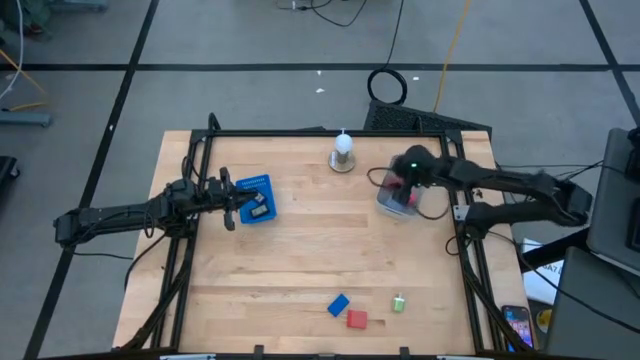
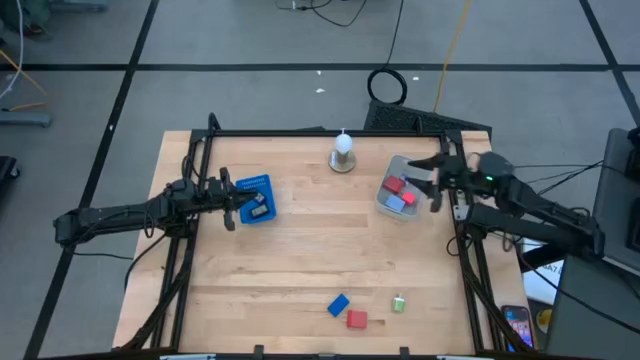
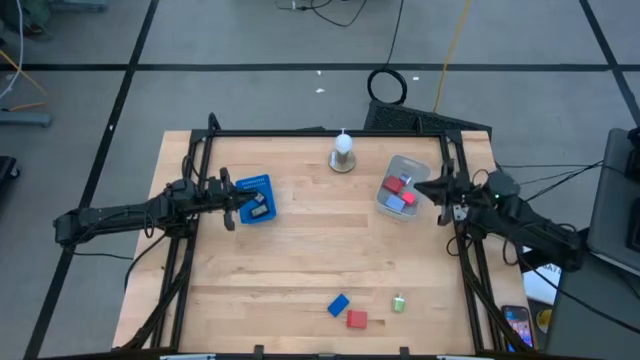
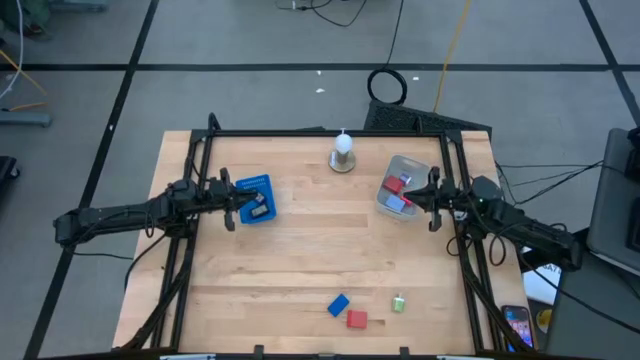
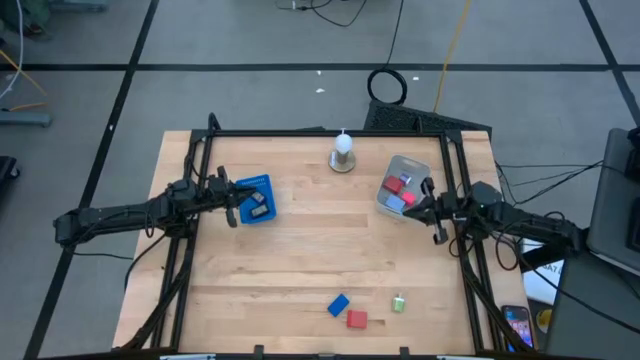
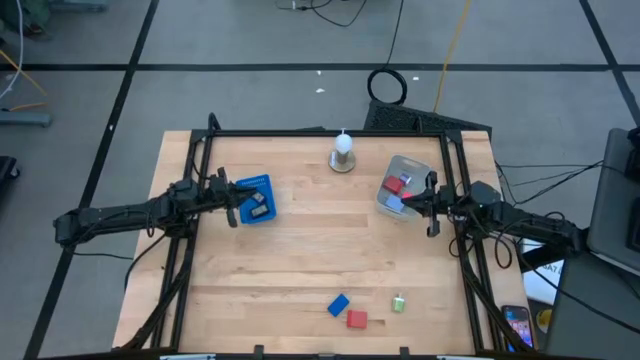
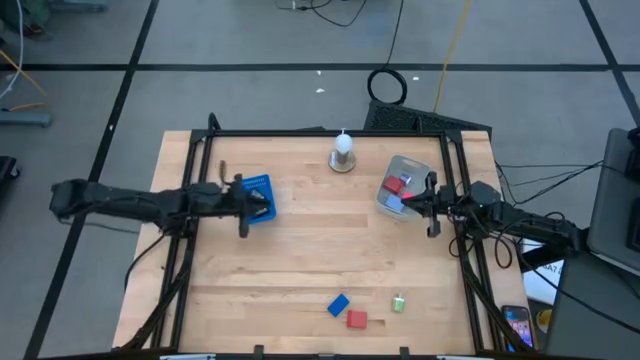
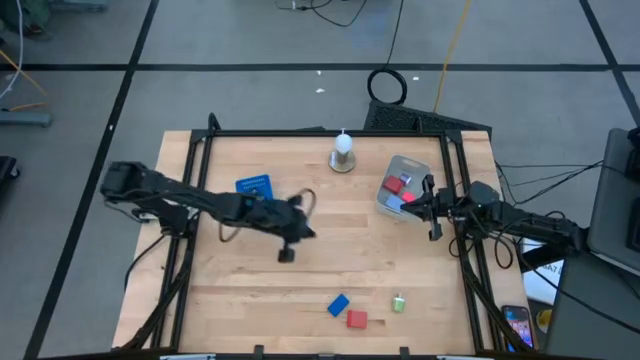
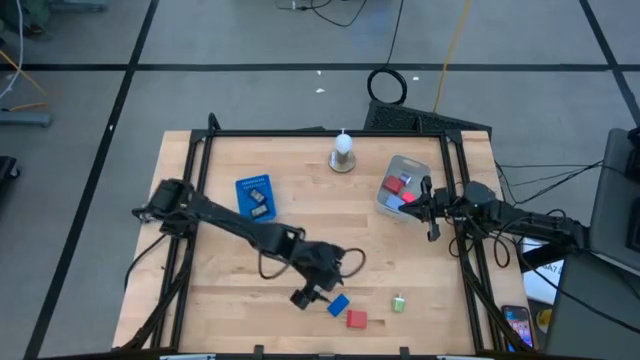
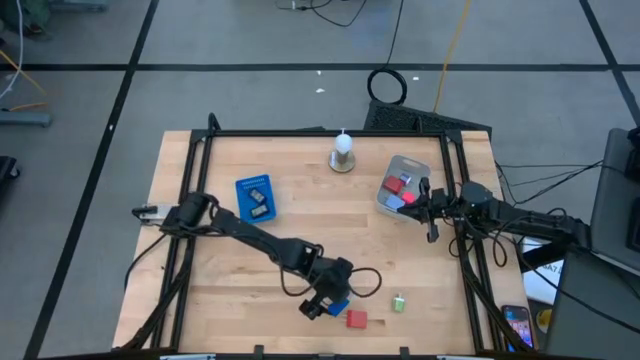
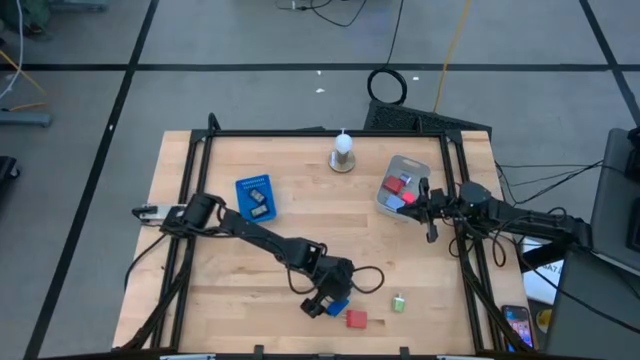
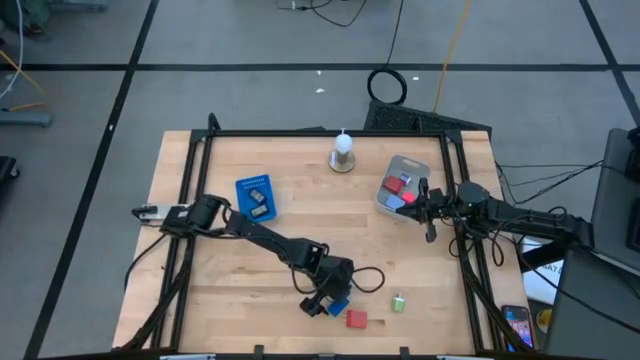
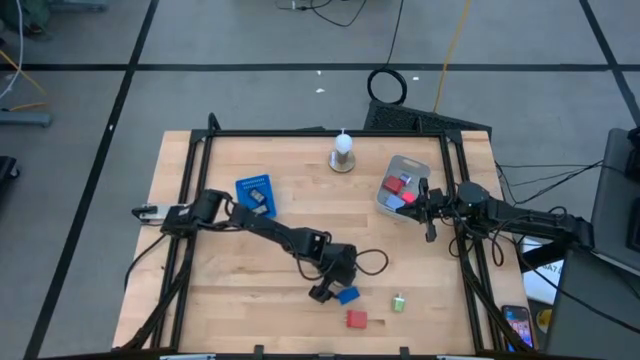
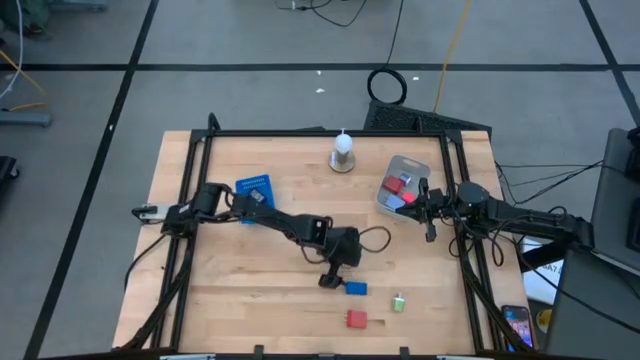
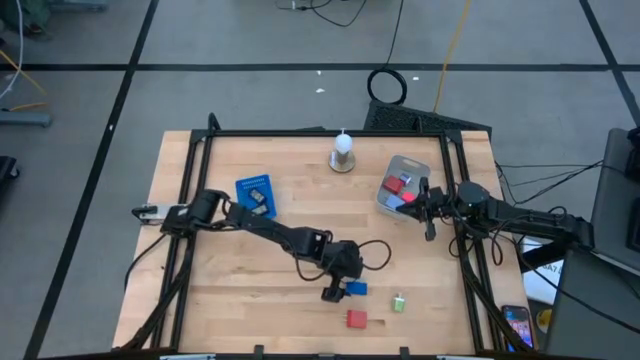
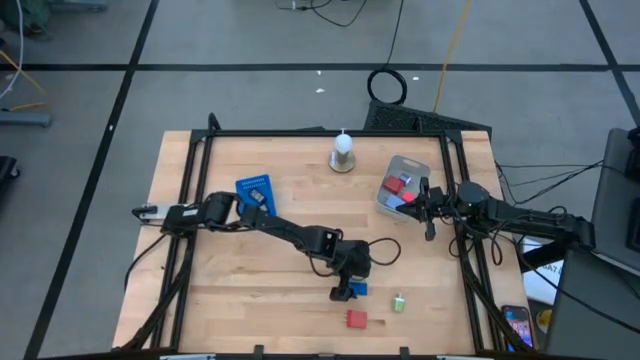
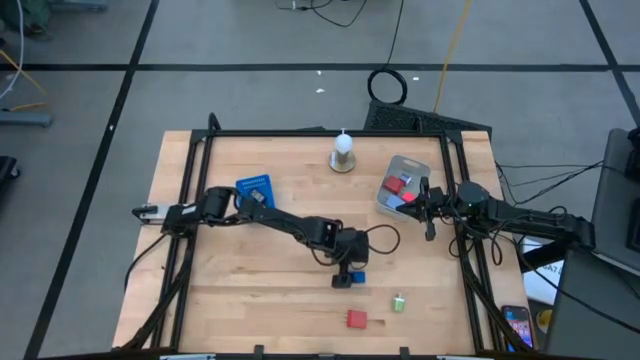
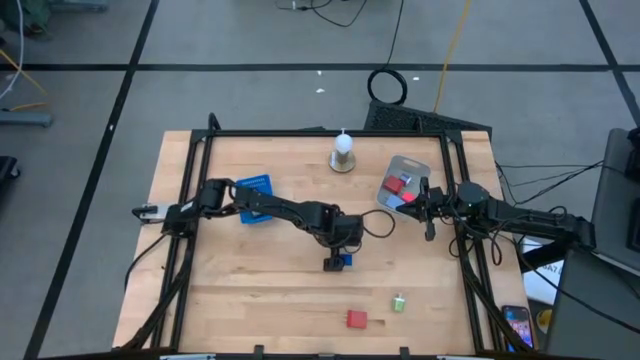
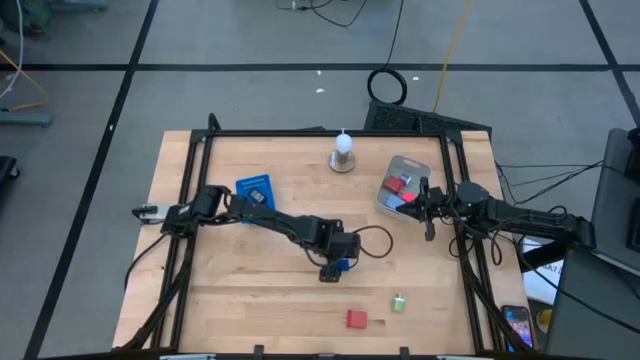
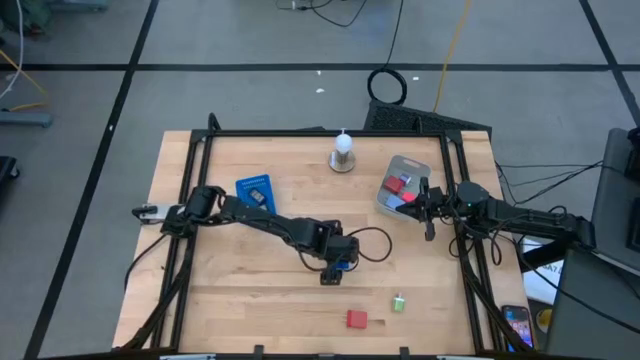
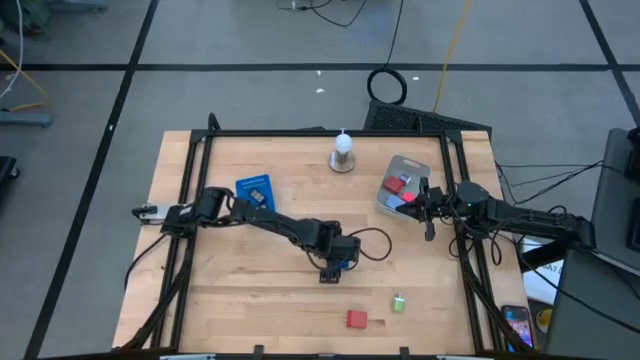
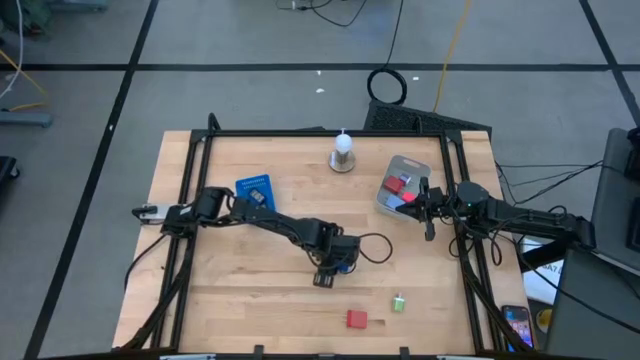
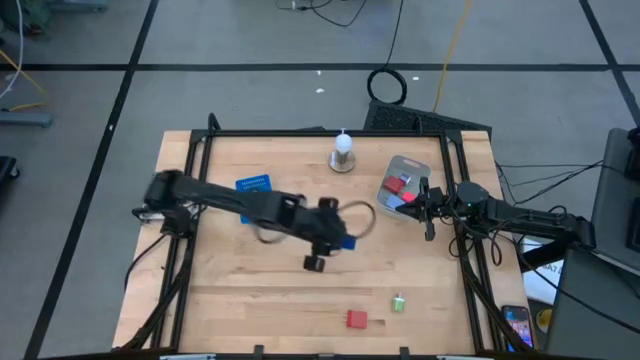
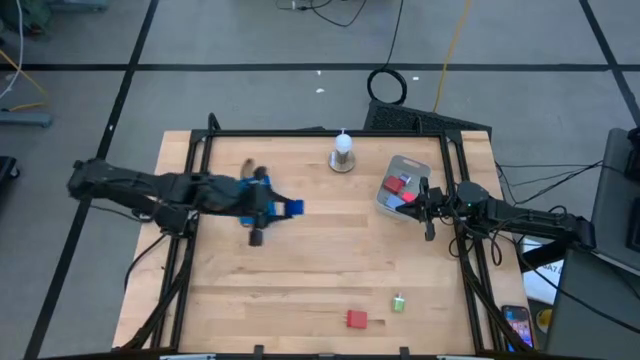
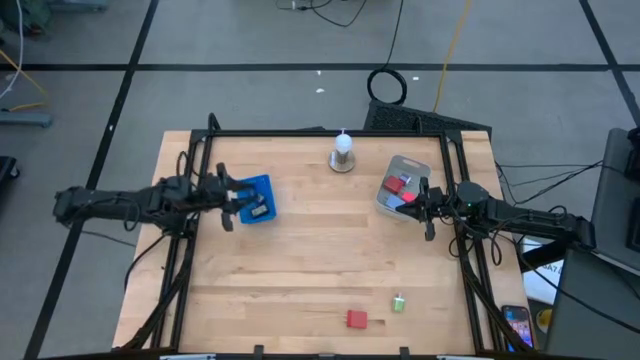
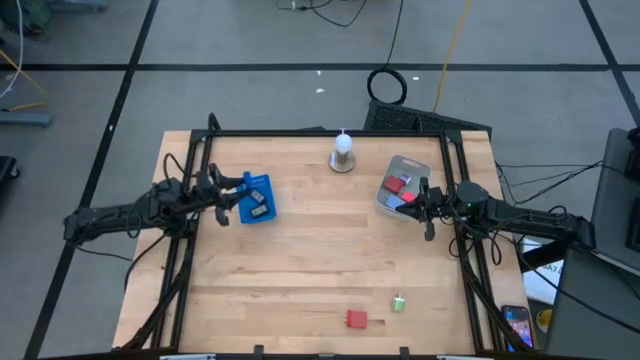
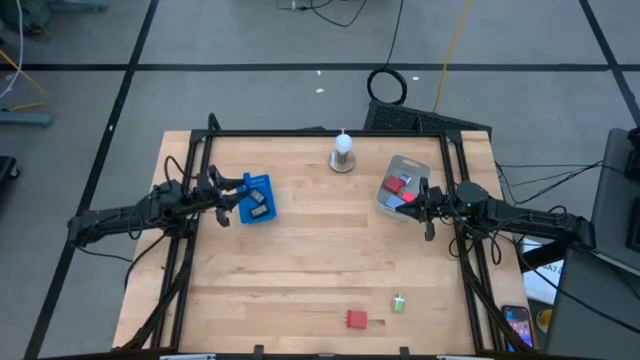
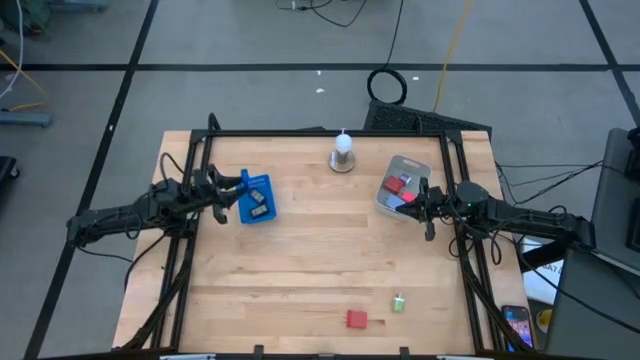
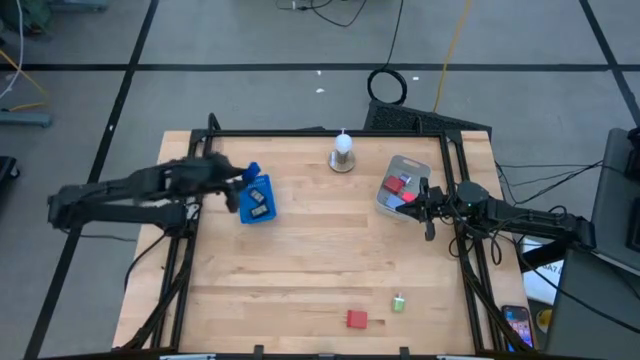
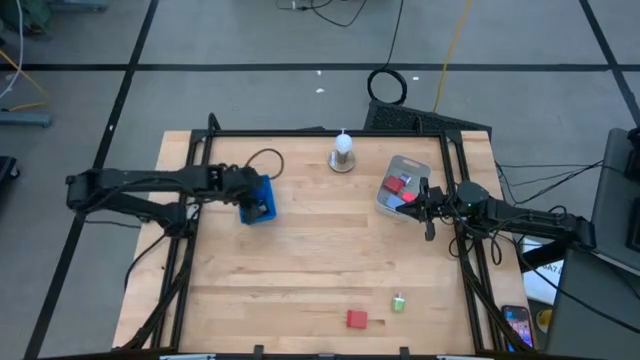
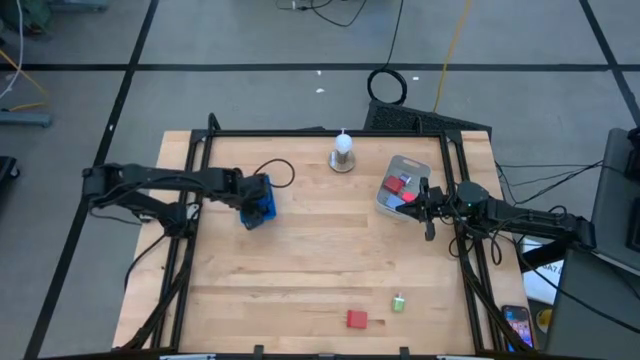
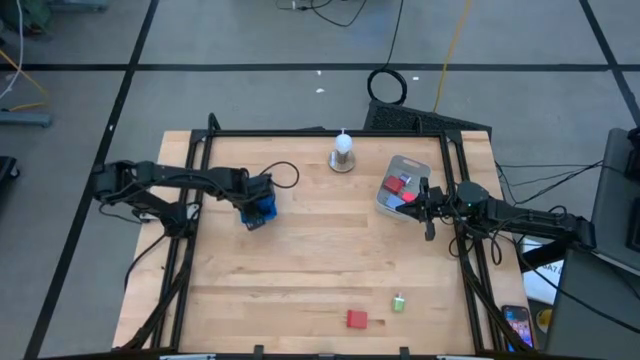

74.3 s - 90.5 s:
Task: Pick & Place Office items
Put the blue digital clock into the blue bin

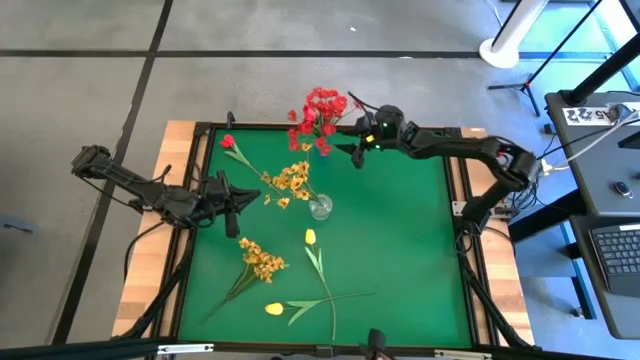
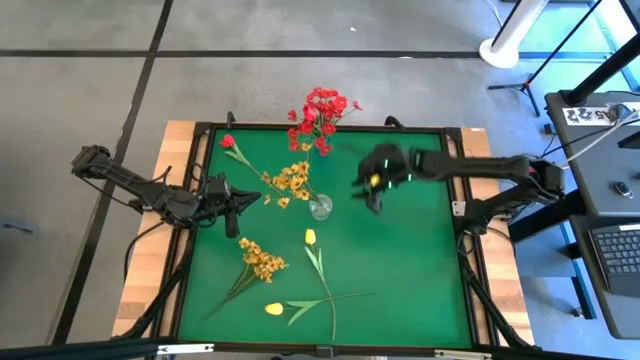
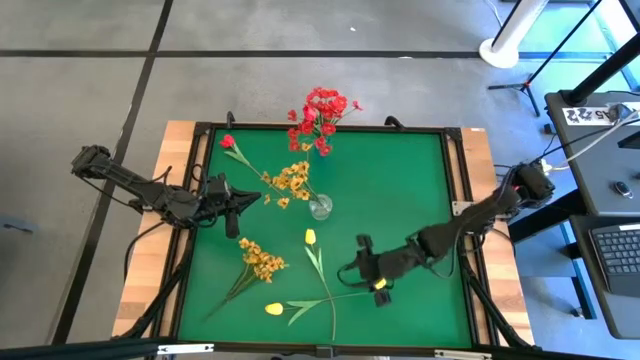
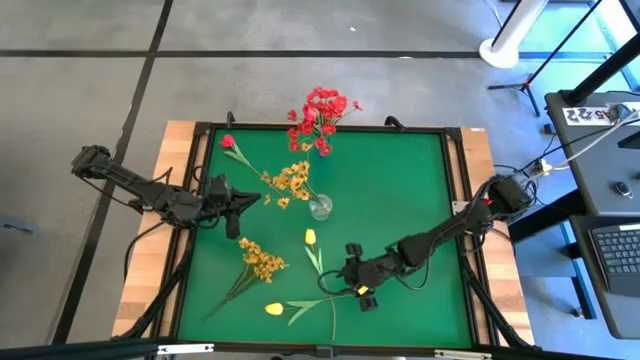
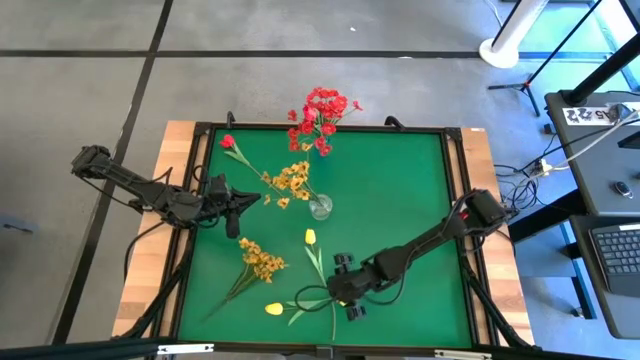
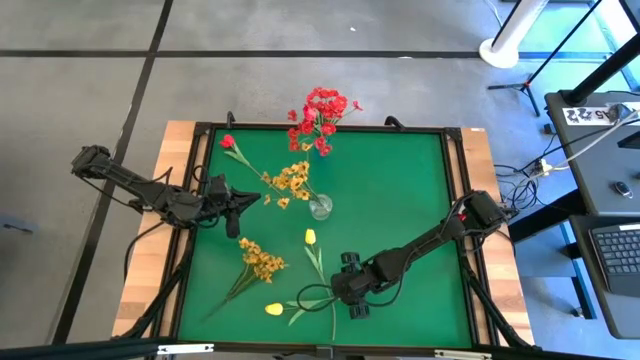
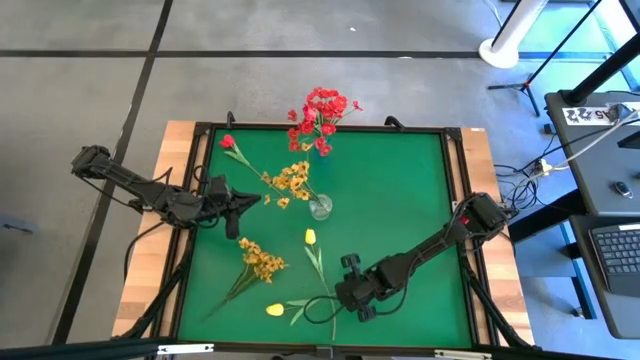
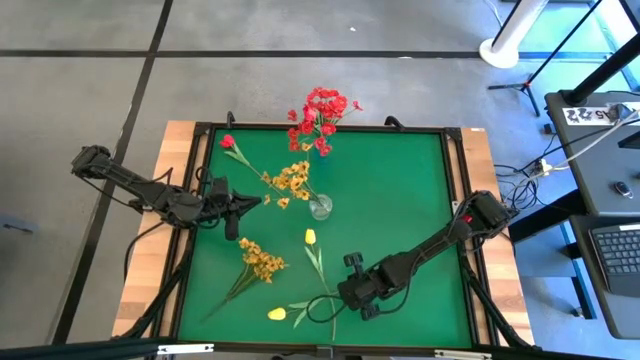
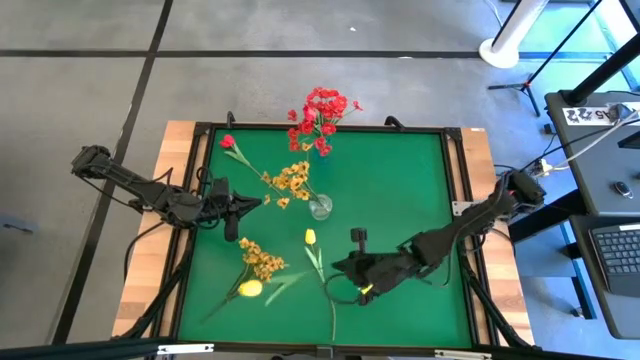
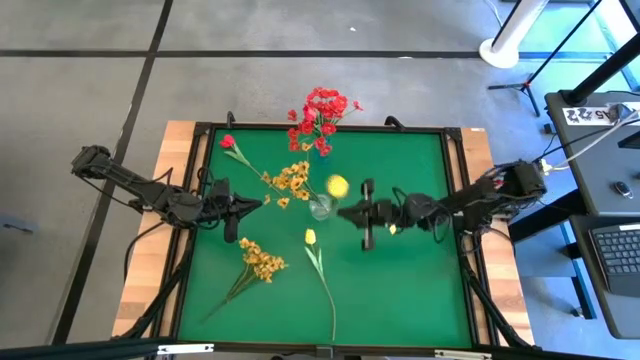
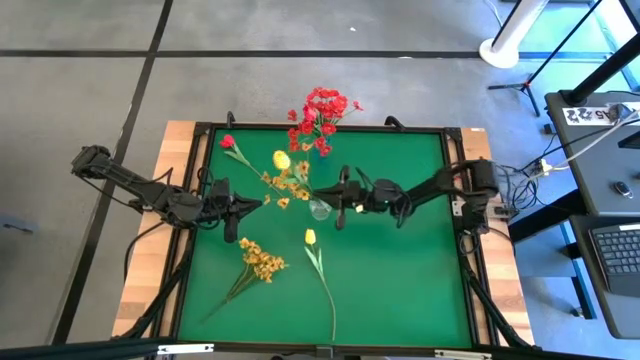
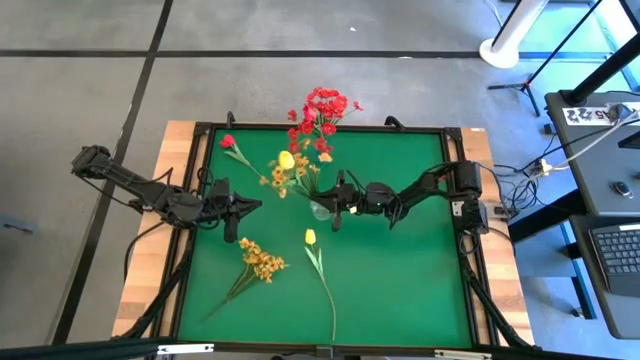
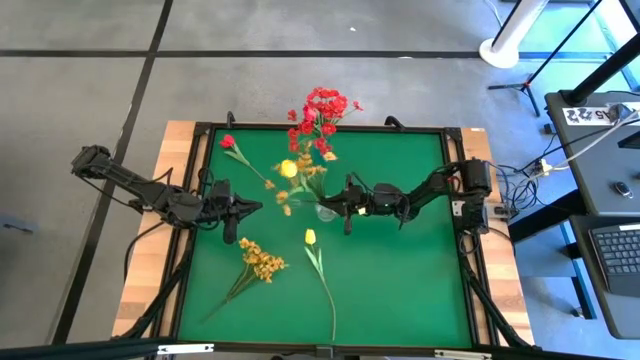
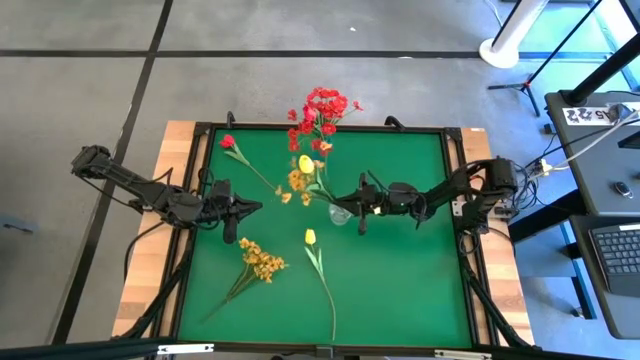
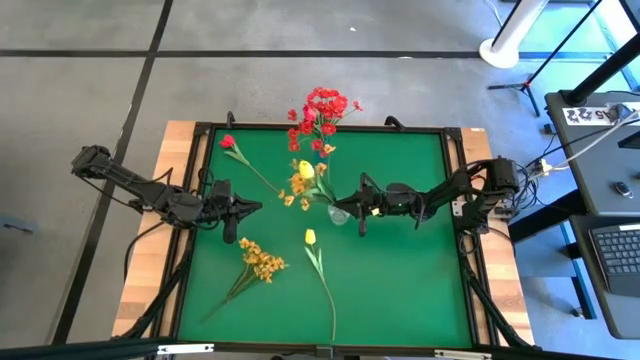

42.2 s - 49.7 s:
Task: Sort flowers into vase by color
Put the bottom yellow tulip into the transparent vase
